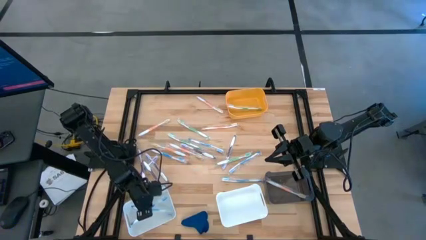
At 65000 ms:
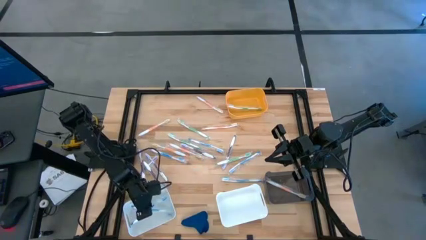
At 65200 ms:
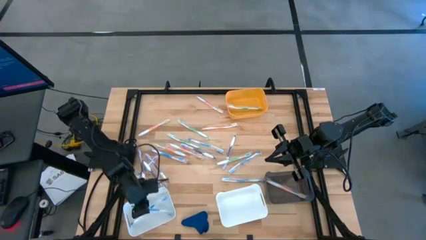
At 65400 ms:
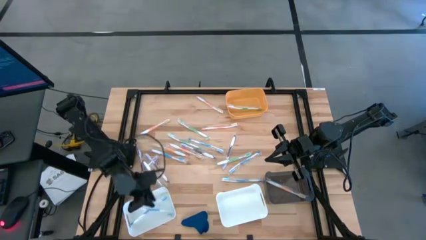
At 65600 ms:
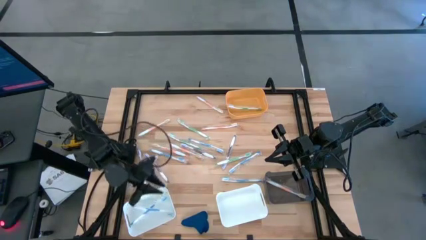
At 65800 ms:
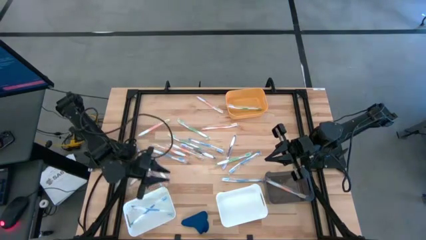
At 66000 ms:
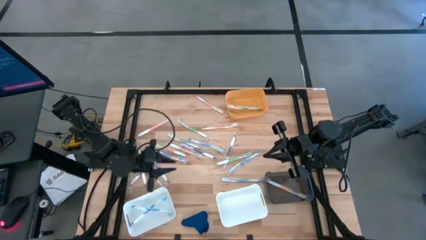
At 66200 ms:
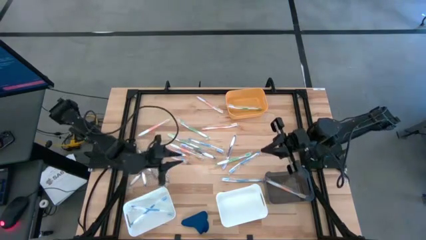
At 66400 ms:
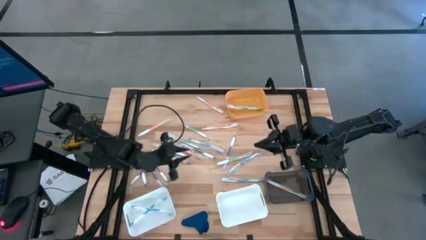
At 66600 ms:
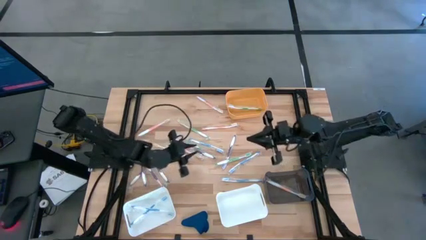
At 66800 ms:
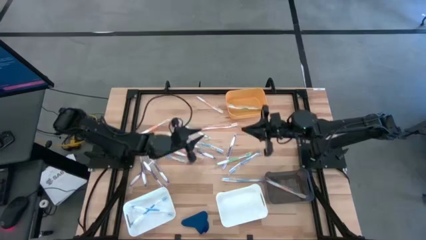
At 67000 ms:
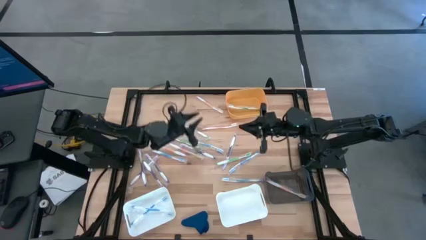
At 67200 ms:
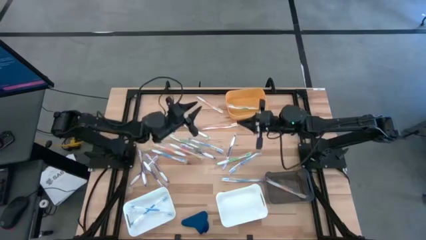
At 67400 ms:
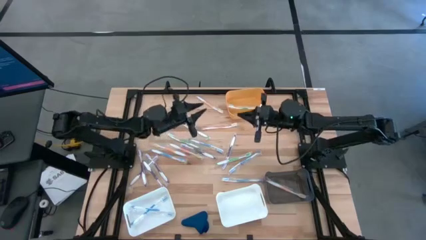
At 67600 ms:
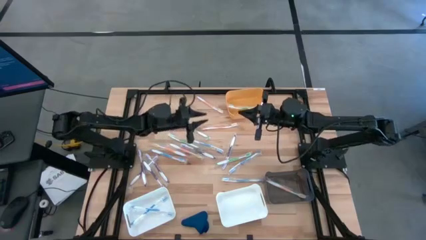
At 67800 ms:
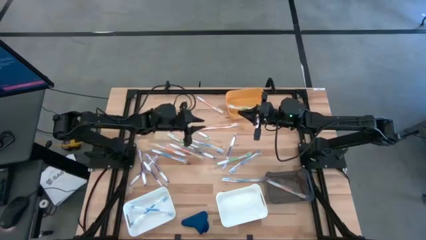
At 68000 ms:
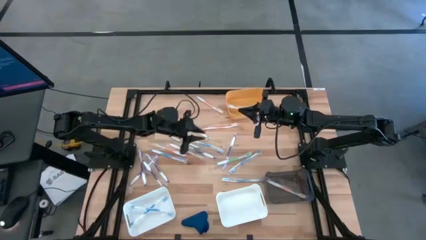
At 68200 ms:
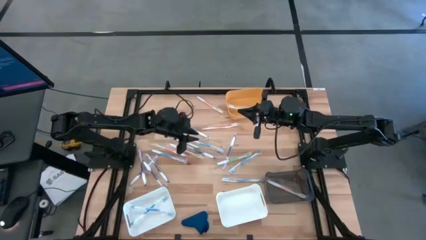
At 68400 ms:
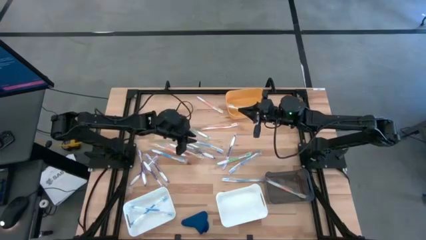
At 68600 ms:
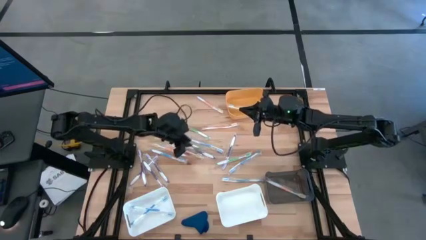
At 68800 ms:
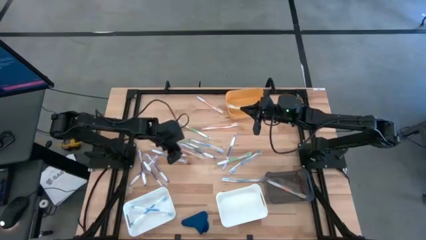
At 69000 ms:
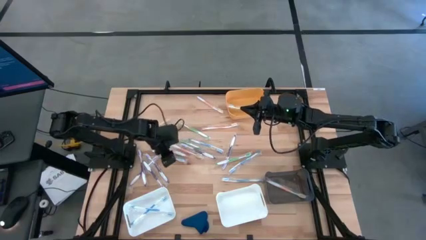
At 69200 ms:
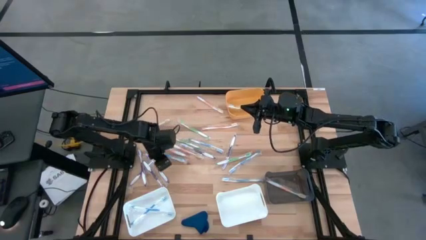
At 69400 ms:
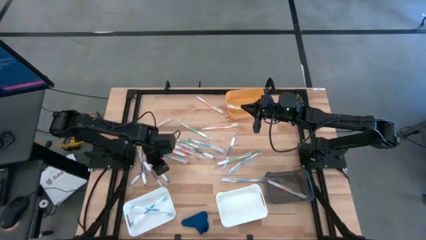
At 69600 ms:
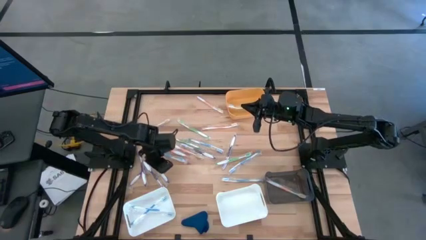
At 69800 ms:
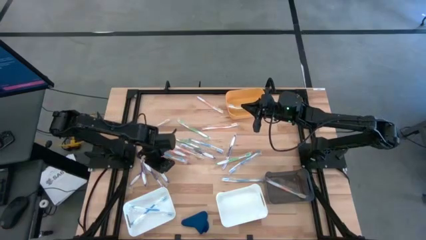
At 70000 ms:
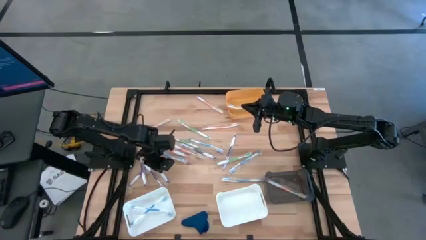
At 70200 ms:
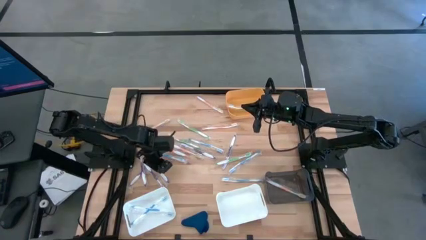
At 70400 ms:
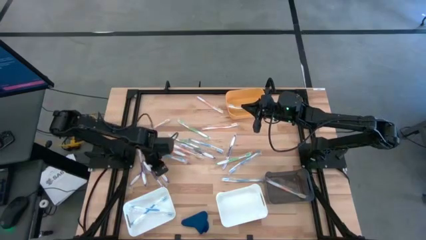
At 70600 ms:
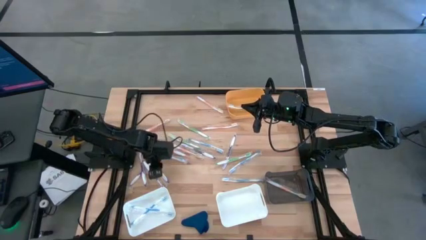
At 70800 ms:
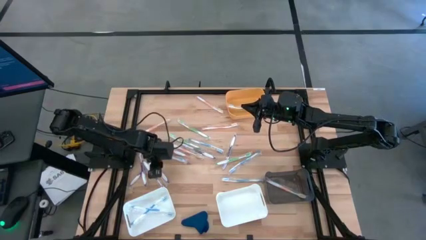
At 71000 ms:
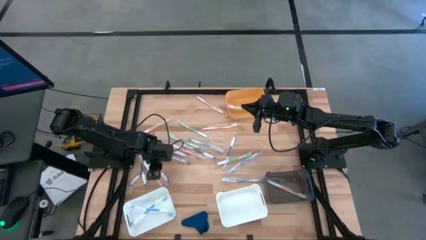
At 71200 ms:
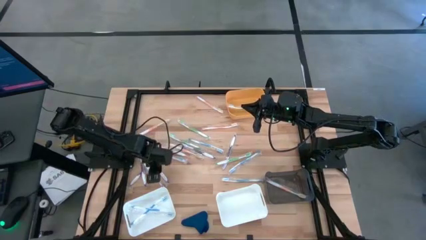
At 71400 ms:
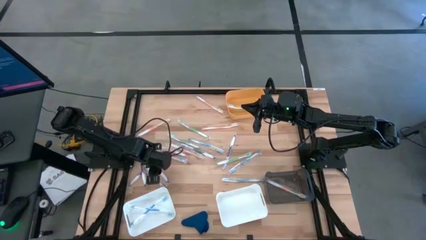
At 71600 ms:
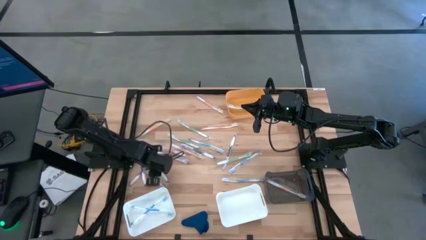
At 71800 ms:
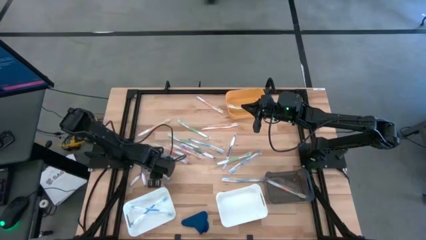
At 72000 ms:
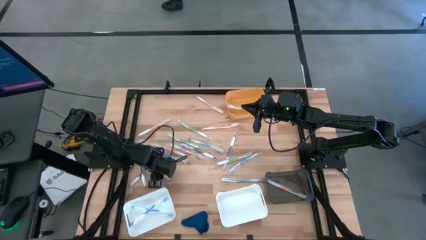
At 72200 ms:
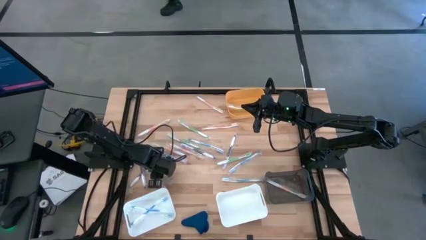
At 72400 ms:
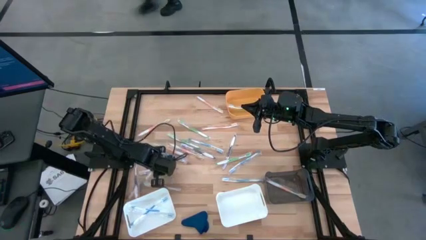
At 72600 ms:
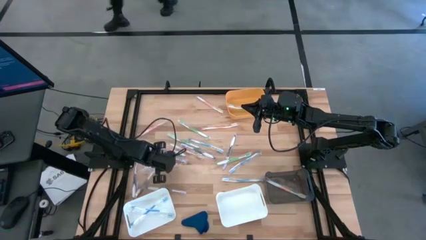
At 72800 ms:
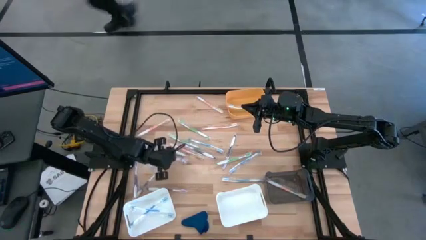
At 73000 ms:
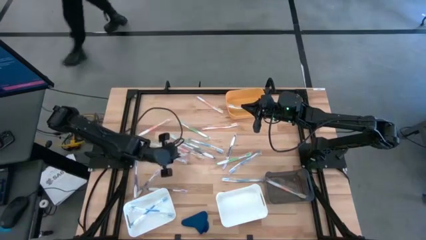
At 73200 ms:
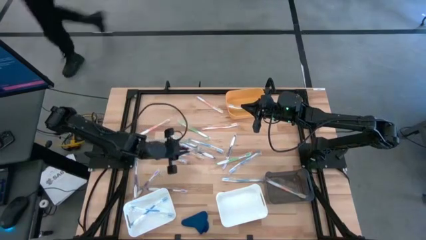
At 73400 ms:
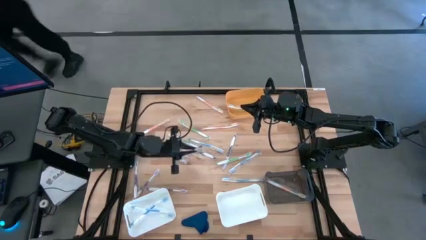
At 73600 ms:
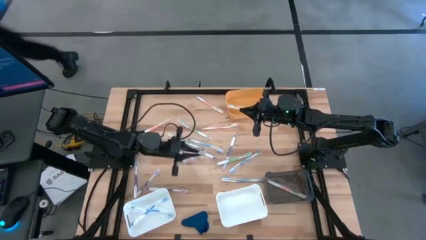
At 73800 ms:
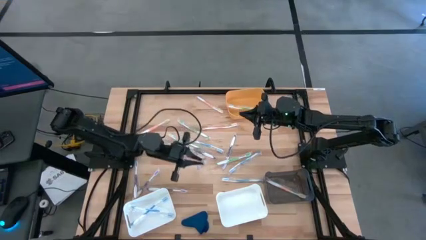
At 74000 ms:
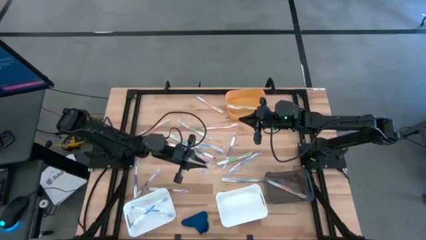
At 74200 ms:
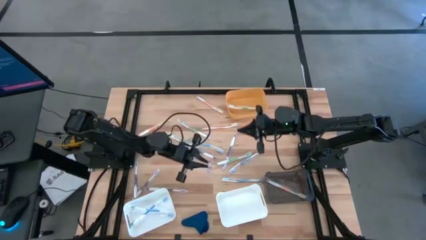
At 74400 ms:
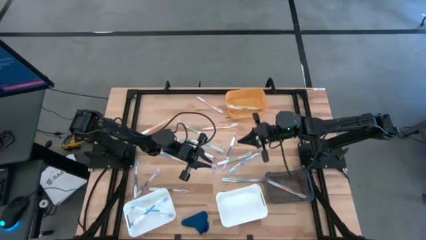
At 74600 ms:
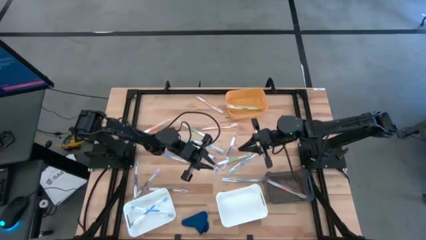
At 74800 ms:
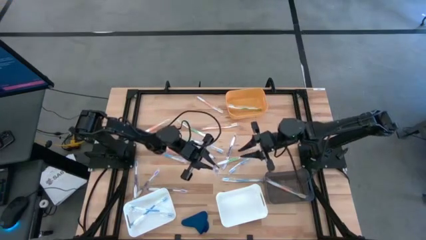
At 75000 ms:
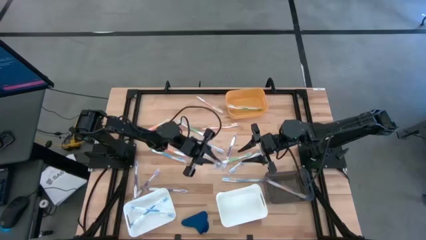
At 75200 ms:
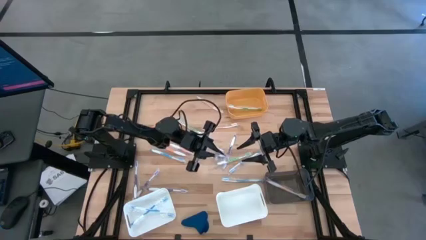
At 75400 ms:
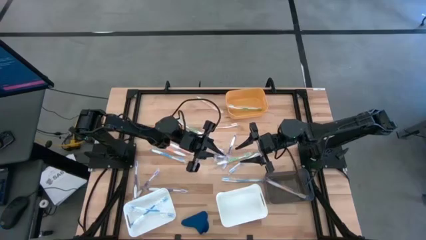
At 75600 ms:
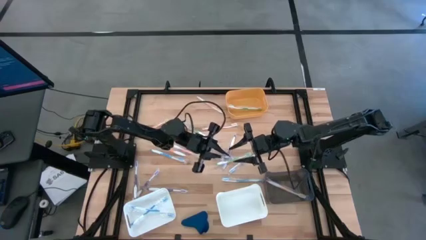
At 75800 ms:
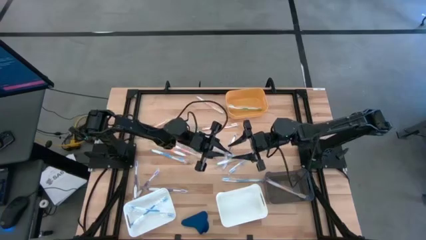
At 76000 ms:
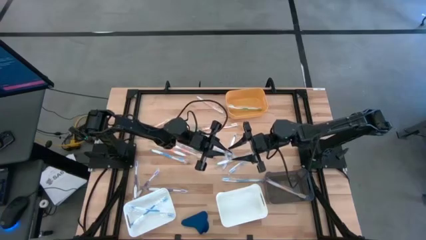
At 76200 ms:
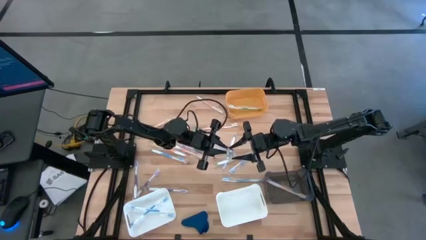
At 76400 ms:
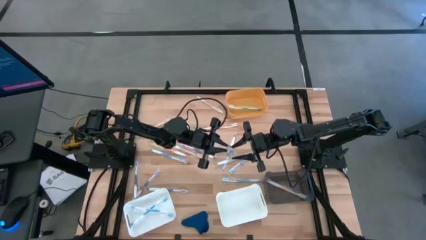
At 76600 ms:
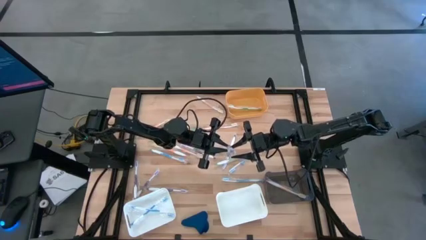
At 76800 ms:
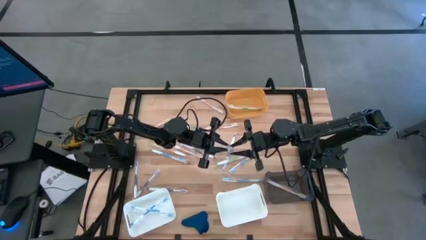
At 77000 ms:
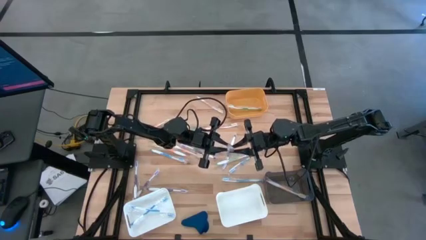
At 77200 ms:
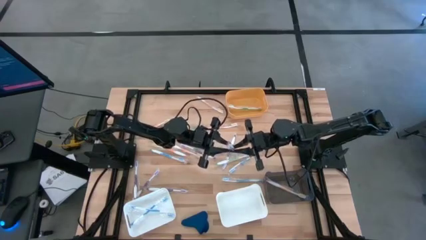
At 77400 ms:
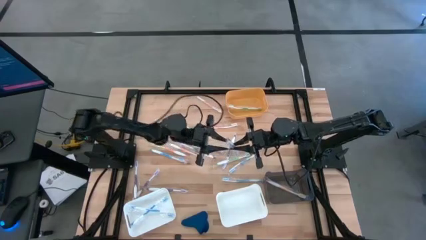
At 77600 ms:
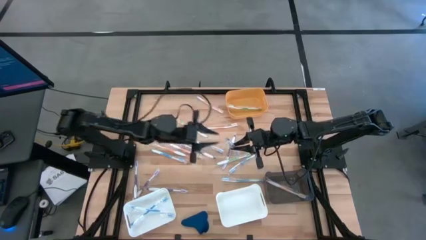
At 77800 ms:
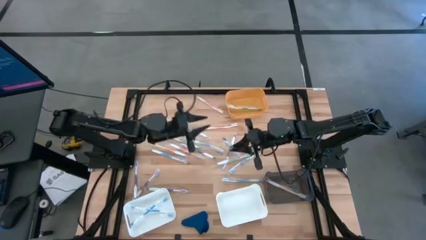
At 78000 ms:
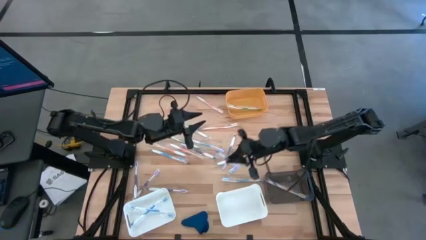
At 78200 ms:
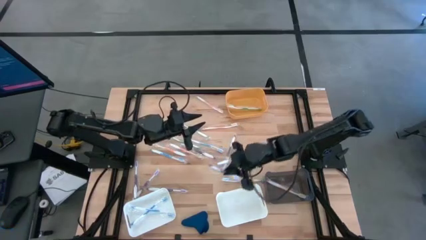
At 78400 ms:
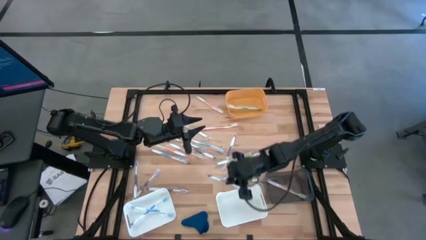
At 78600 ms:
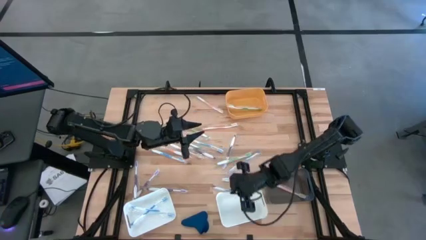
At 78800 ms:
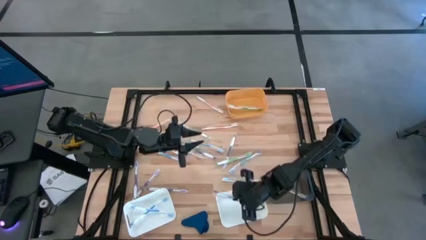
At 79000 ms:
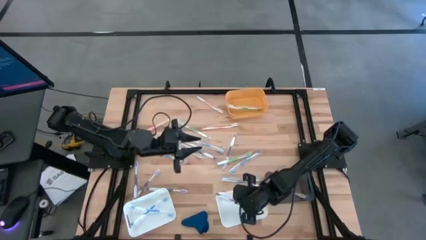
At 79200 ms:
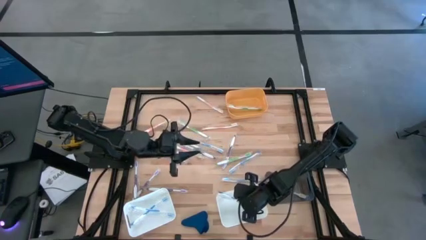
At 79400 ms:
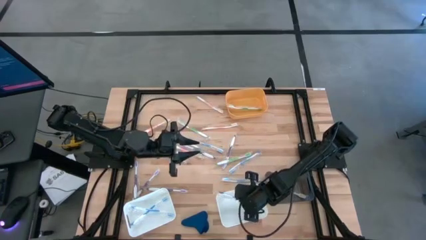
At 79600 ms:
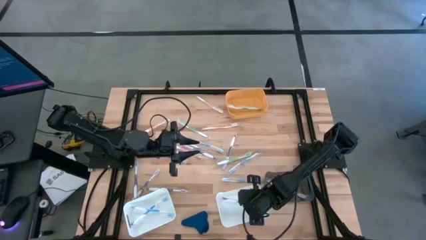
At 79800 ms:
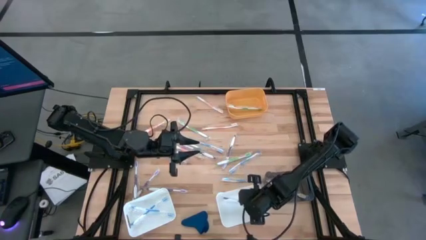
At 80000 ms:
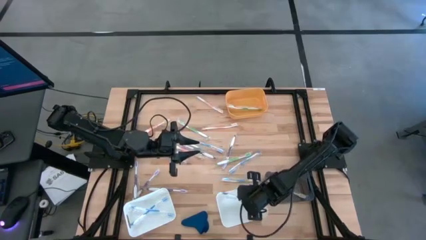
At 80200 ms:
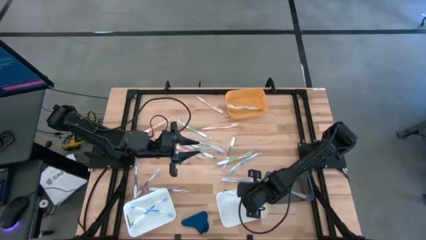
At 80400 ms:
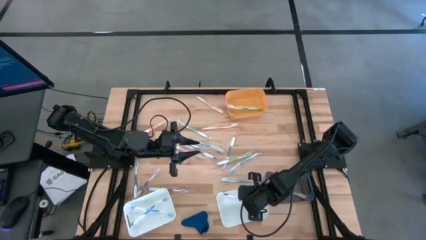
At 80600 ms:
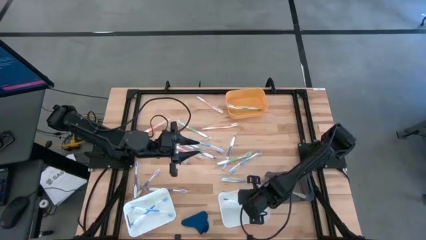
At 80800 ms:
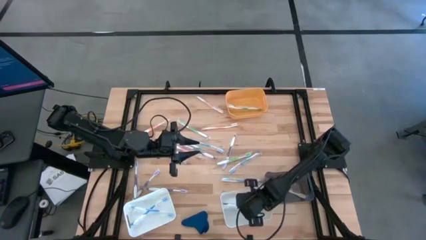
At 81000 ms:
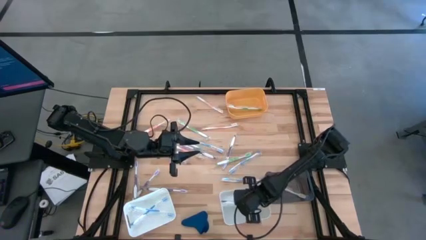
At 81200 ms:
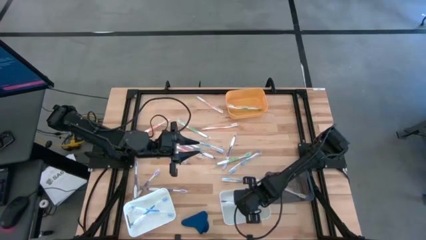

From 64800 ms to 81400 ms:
Task: Pick & Place Toothbrushes
Put the violet toothbrush into the right white bin
